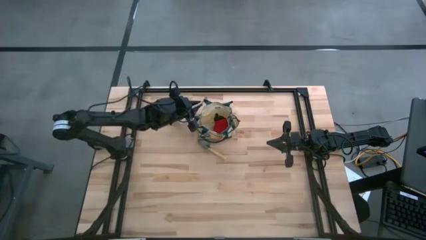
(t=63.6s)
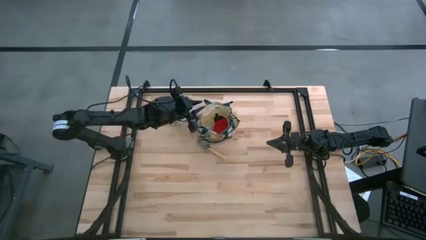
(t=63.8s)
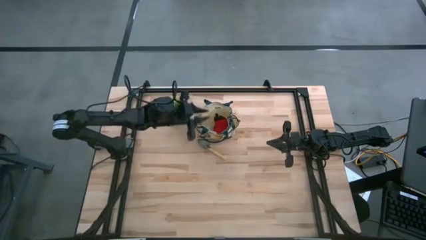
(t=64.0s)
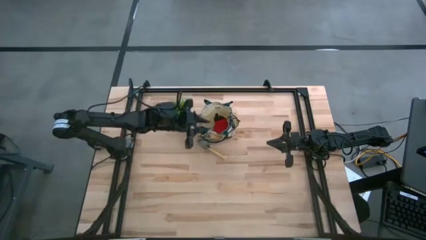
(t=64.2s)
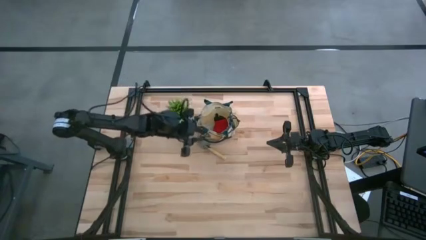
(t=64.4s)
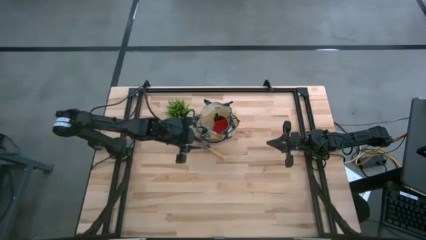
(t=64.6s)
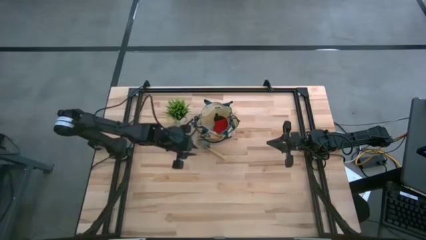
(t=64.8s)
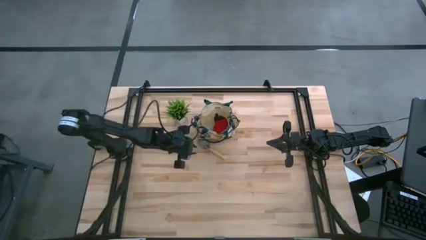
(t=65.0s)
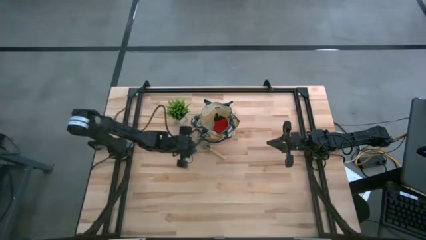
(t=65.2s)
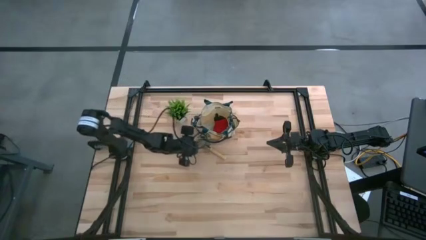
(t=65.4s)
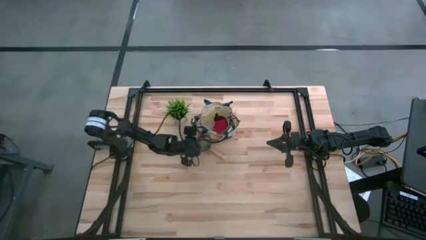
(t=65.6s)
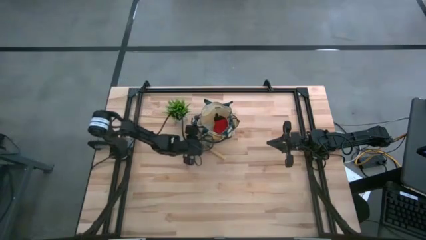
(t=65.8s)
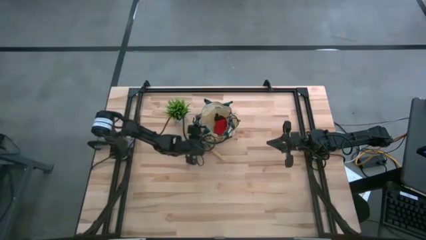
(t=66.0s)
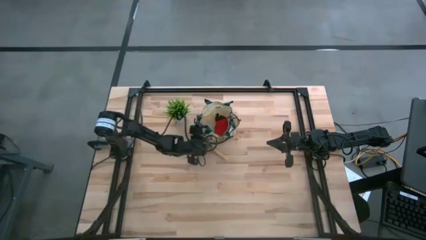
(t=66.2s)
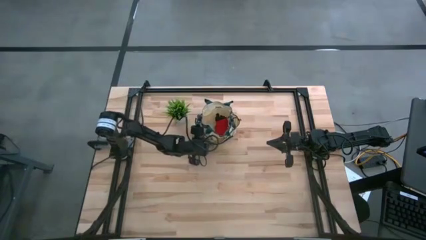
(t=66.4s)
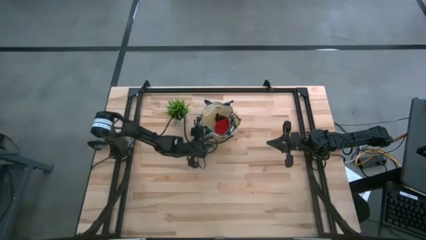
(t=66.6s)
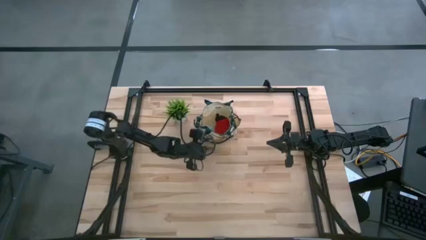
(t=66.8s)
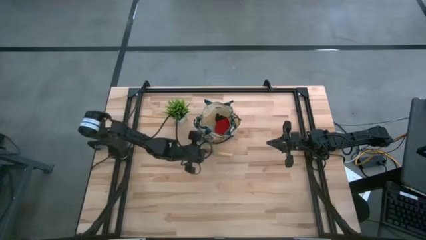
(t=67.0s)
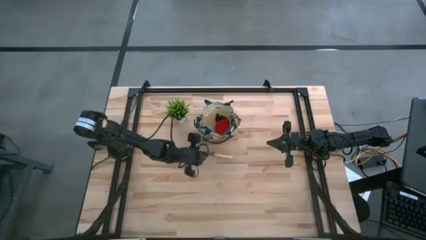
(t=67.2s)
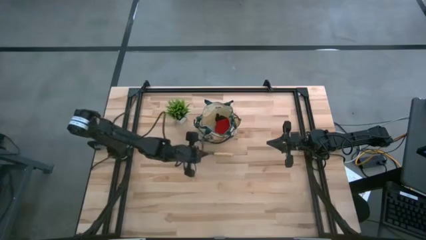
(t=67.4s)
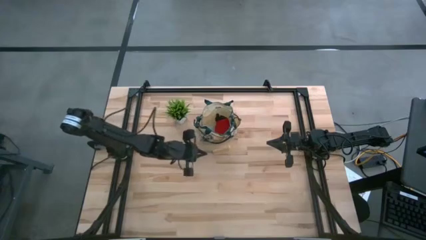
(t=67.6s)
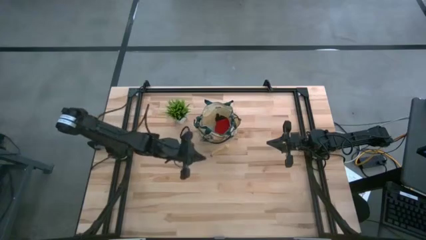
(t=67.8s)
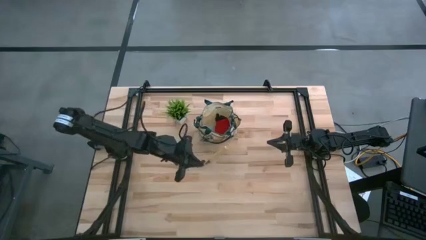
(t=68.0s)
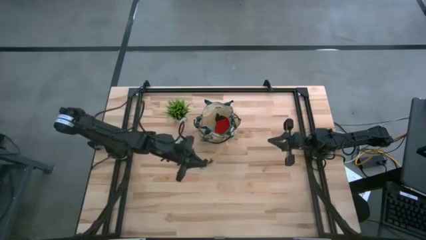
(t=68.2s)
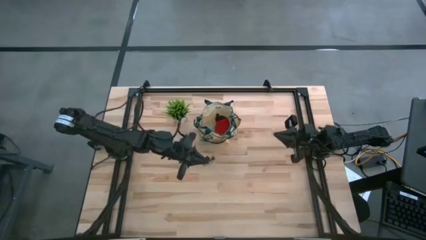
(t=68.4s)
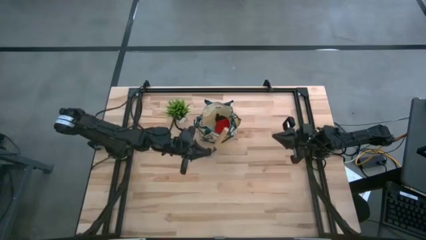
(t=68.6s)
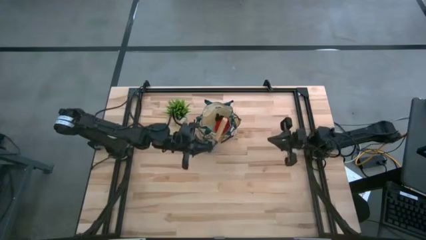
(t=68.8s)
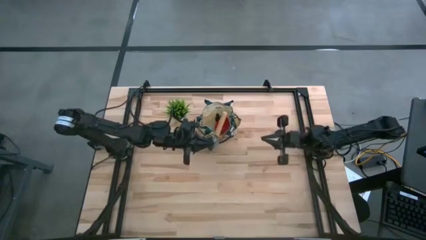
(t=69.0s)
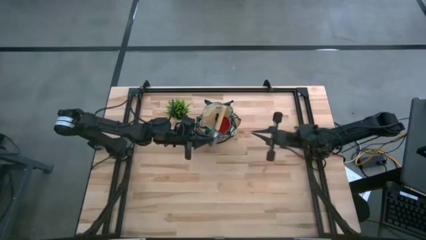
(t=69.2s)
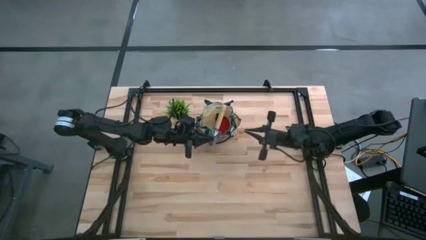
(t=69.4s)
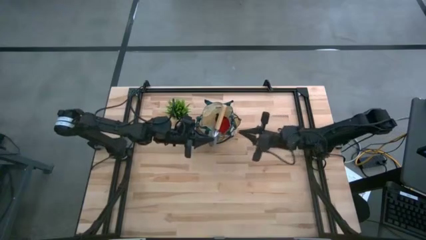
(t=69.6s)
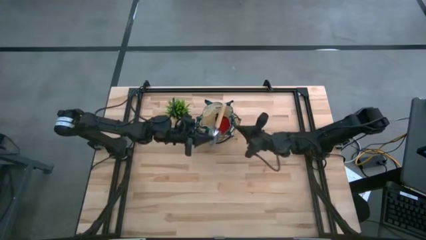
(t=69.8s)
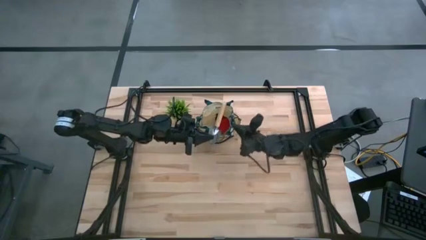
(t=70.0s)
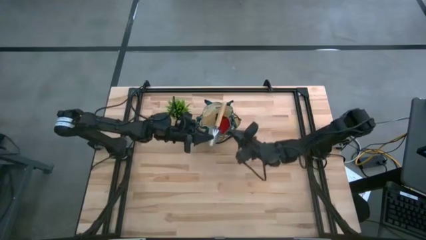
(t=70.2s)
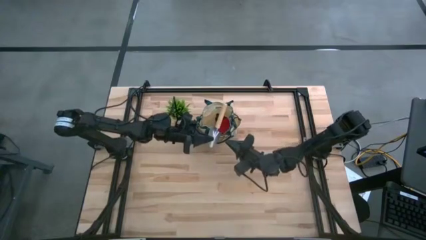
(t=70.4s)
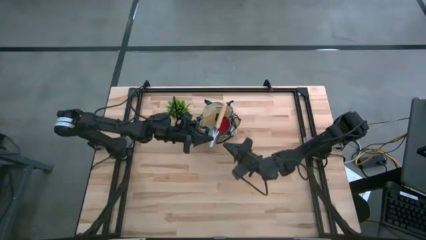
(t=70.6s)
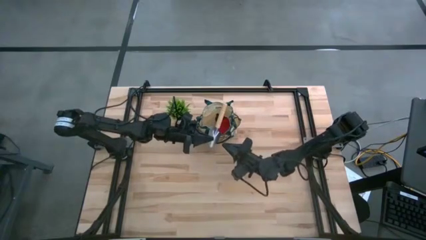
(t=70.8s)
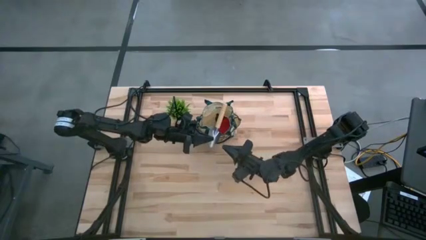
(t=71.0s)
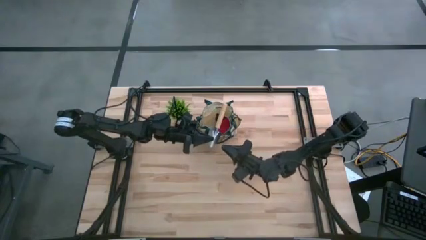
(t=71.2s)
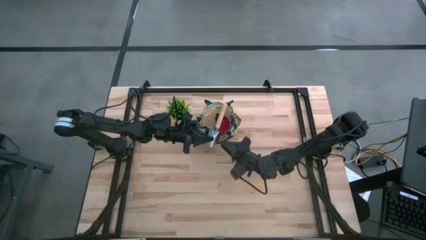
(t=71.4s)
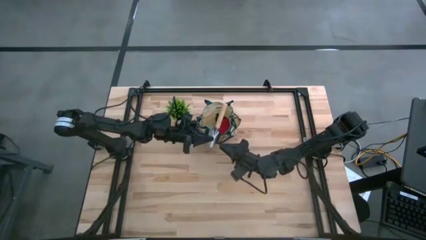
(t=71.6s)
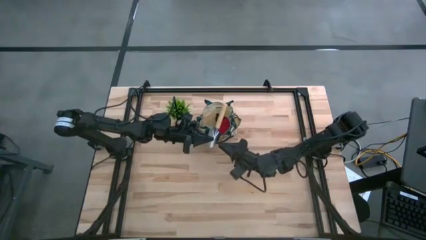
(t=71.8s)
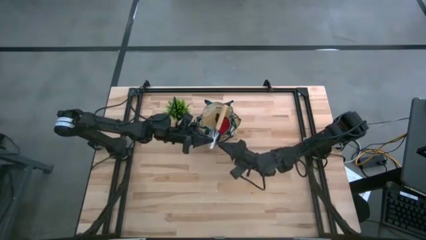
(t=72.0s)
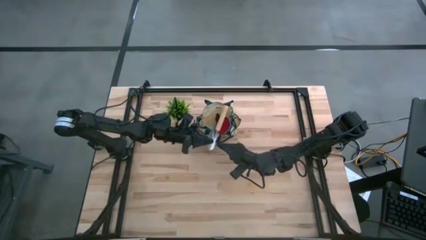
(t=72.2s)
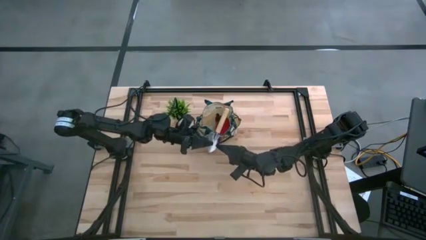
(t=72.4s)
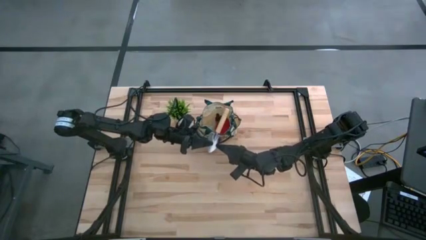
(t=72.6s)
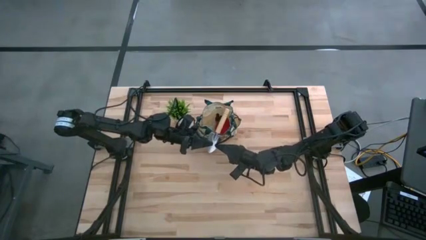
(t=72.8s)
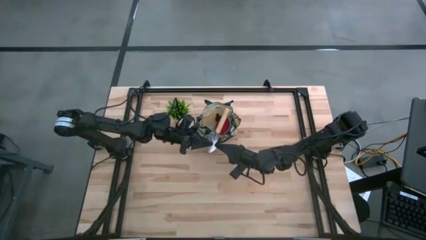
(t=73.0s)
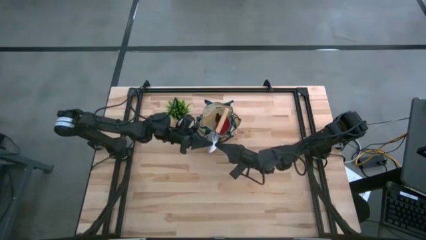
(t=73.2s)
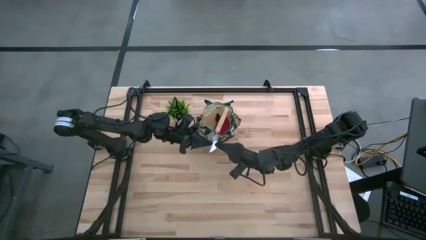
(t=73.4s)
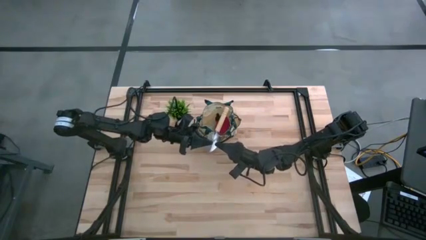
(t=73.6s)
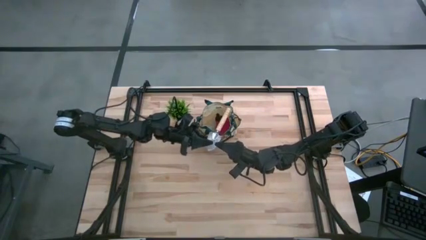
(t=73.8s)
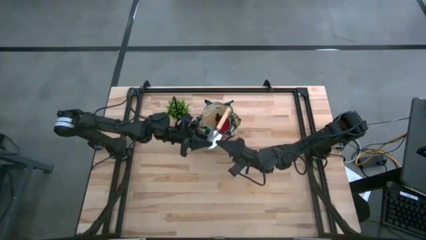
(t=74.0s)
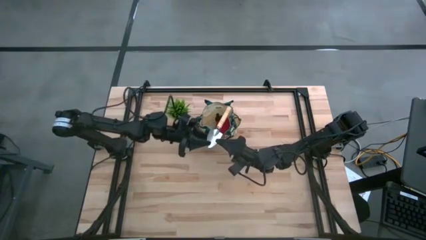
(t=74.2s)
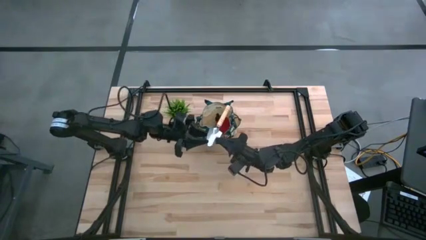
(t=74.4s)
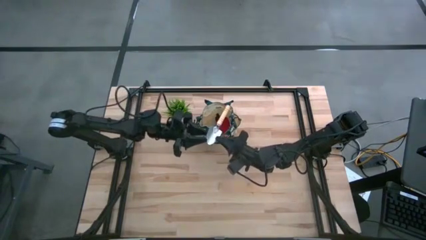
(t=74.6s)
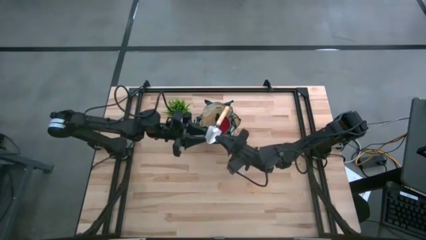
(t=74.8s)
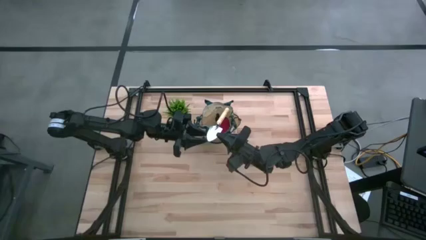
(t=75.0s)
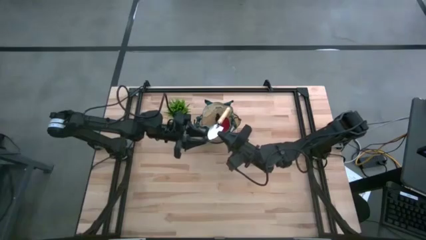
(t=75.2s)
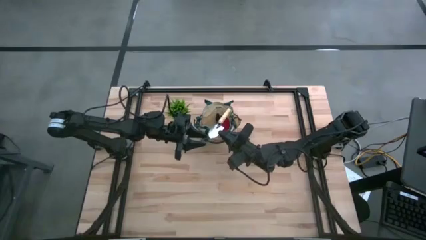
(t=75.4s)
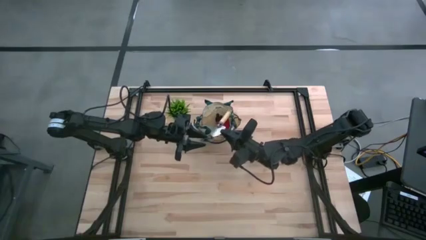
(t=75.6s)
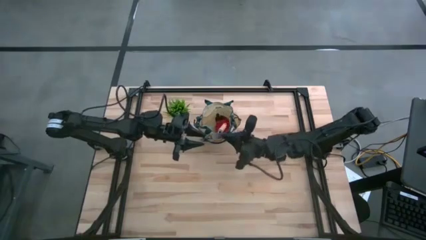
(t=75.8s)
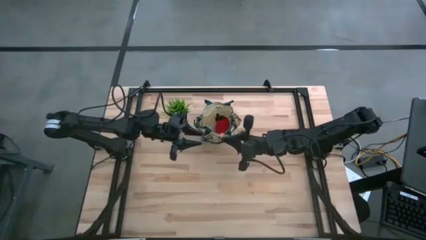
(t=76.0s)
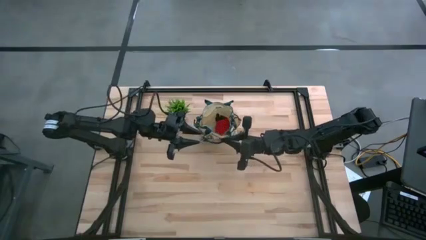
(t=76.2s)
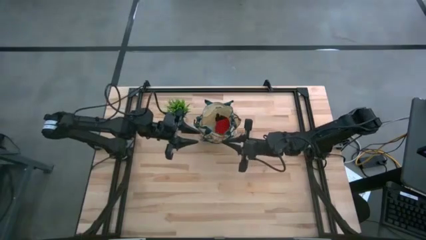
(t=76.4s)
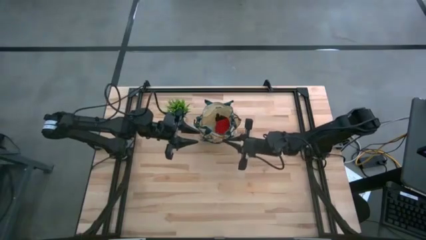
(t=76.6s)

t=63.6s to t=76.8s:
Task: Pick & Place Garden tools in Gardening bag
Put the brown trowel into the white gardening bag
